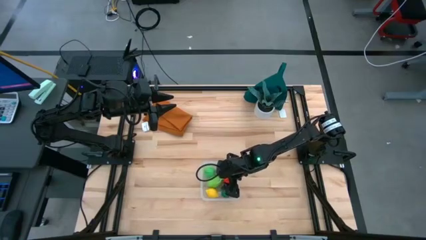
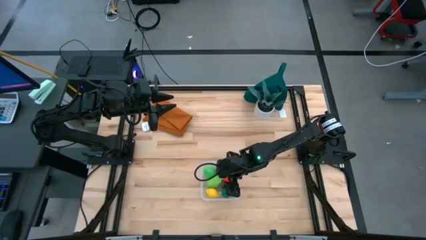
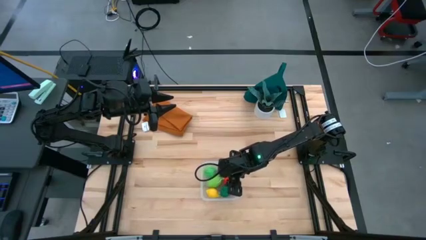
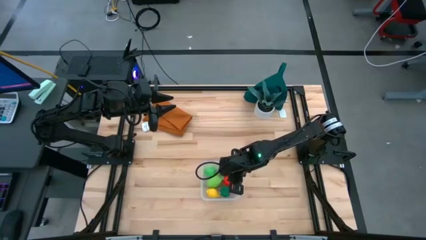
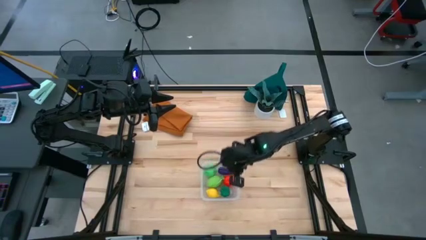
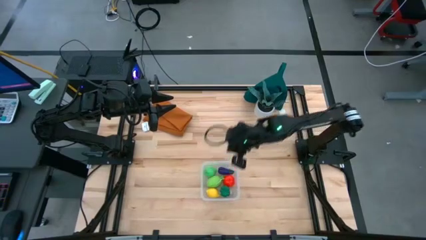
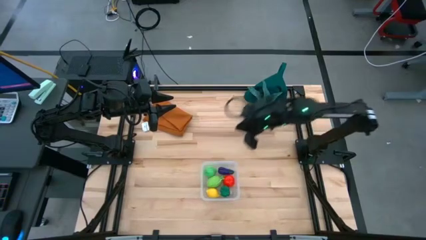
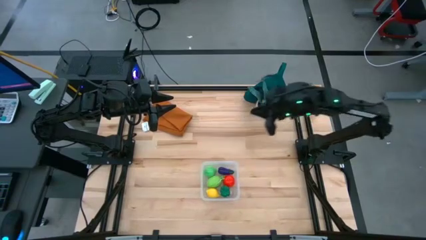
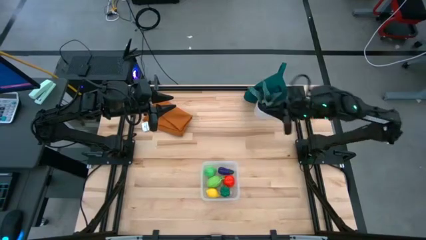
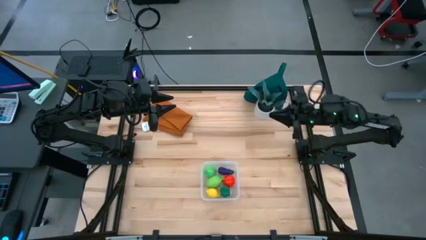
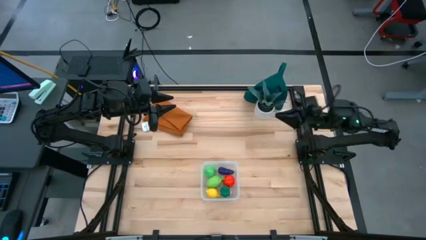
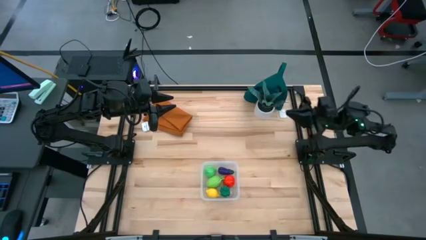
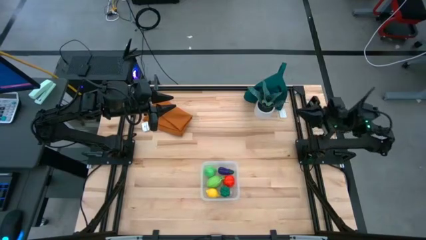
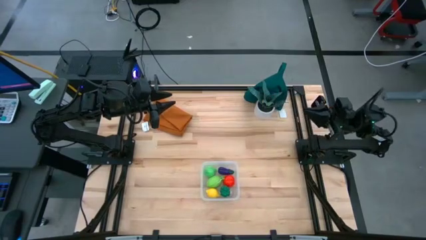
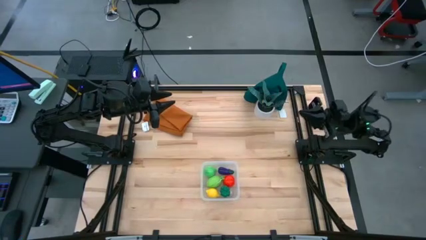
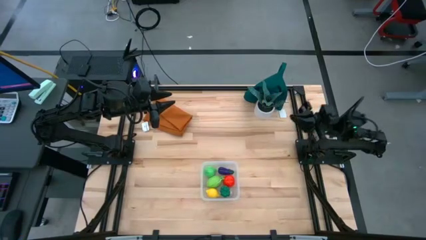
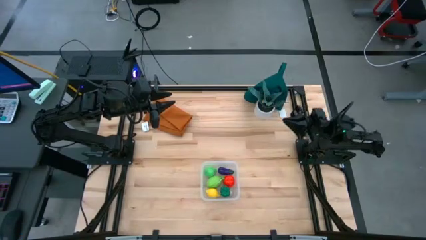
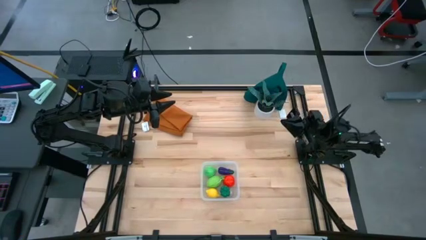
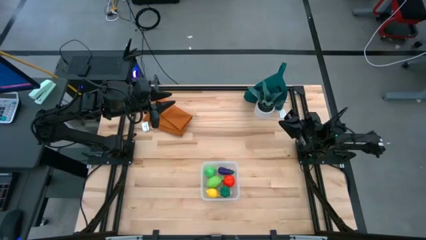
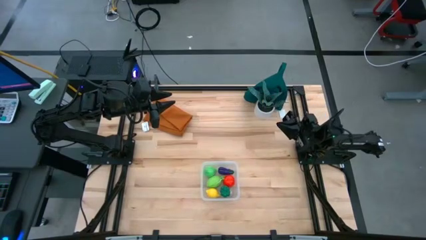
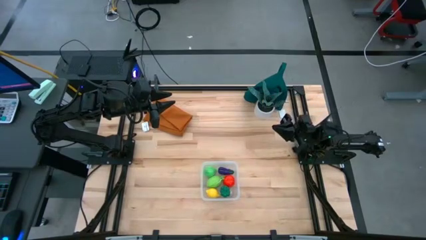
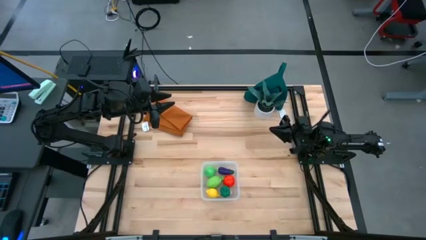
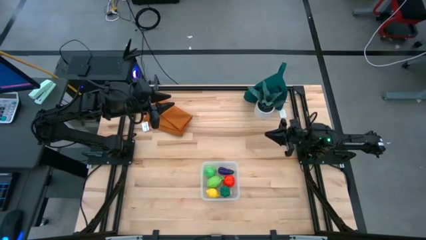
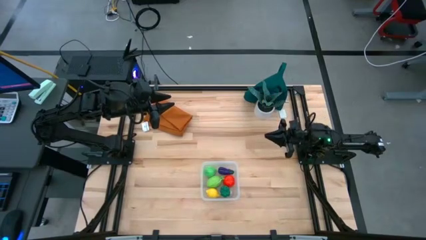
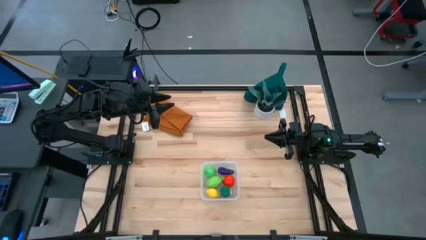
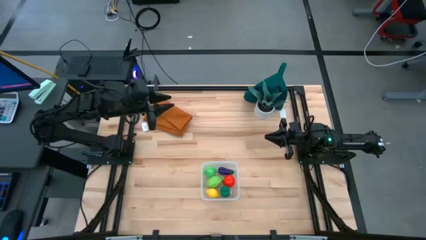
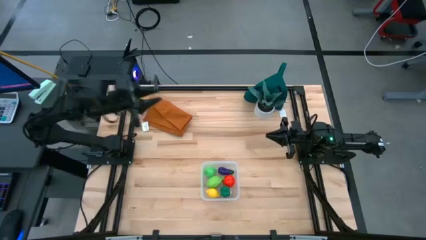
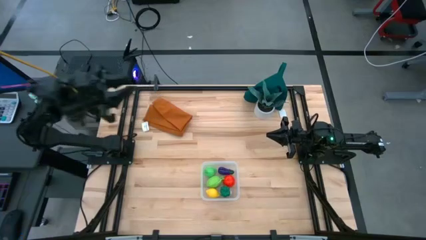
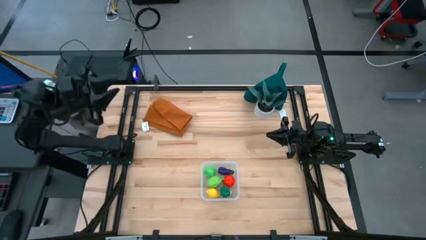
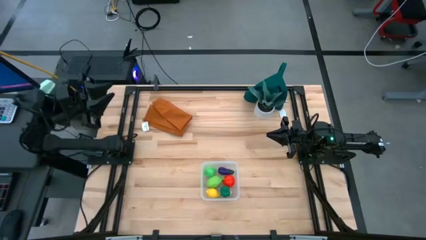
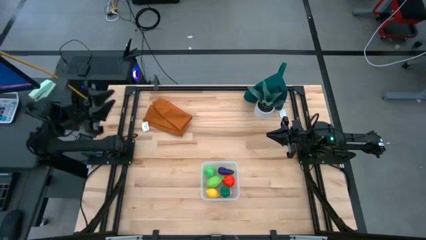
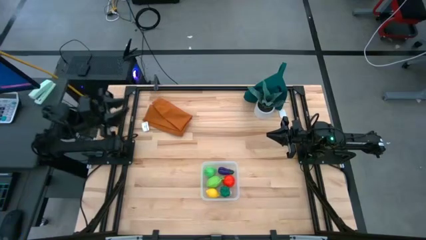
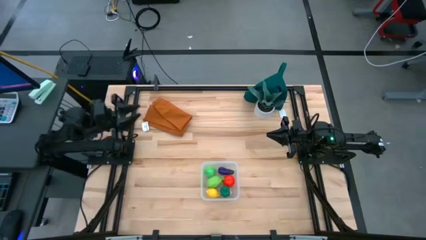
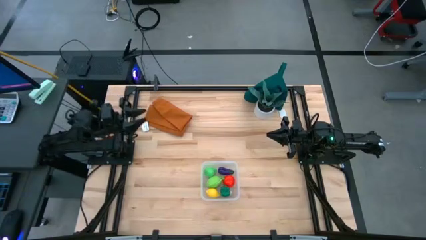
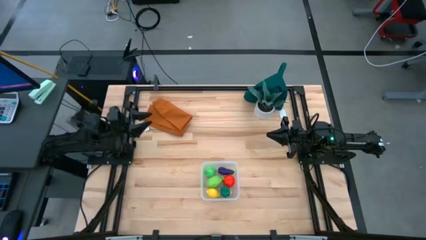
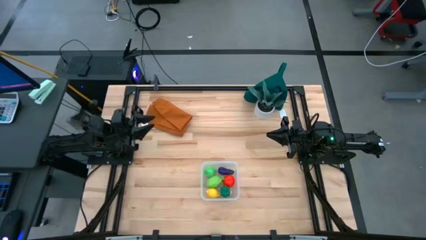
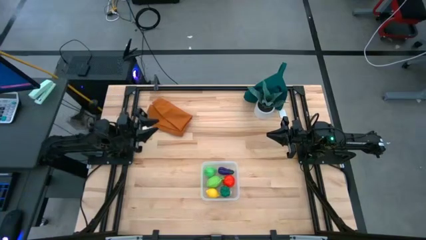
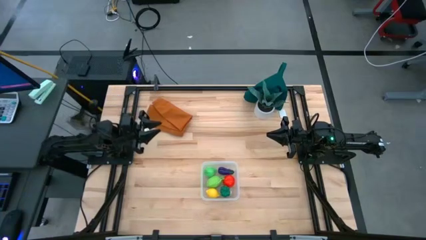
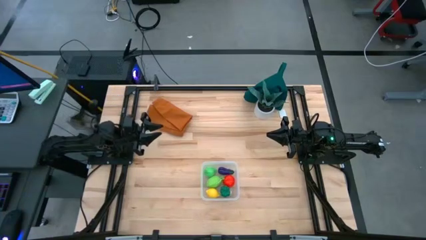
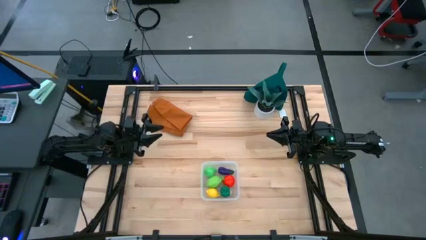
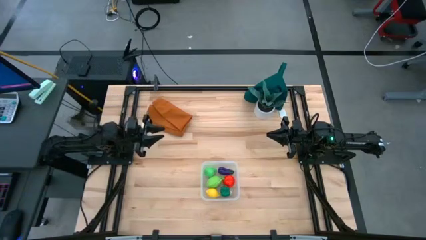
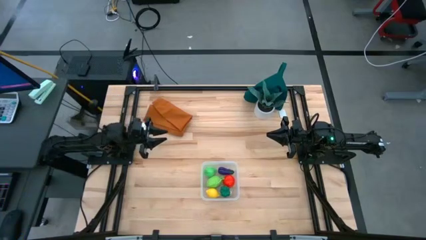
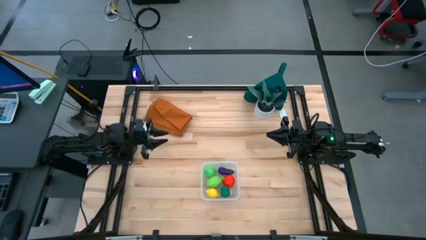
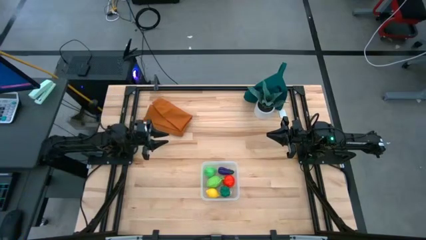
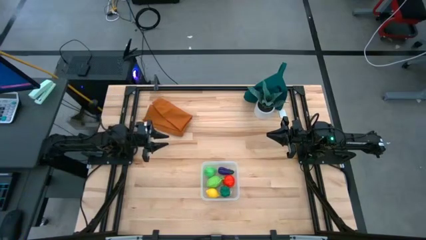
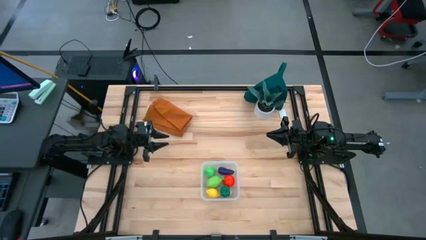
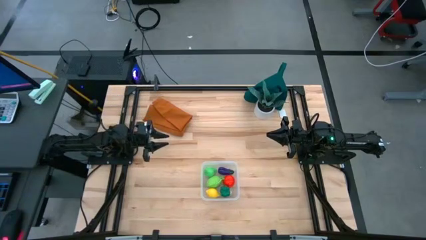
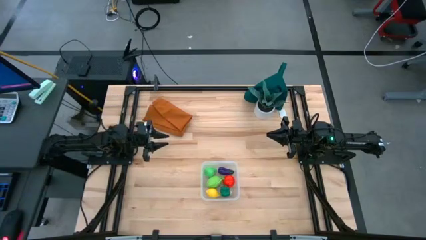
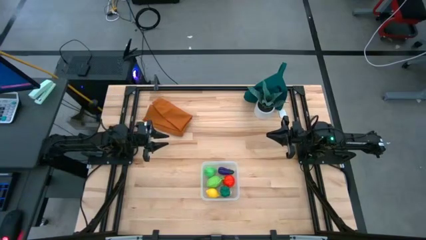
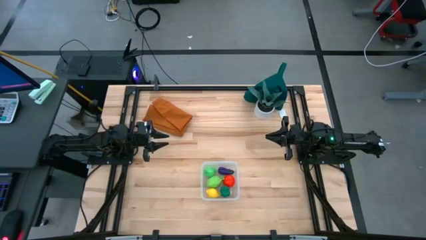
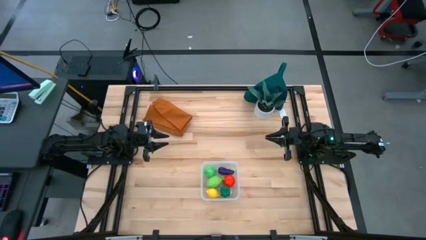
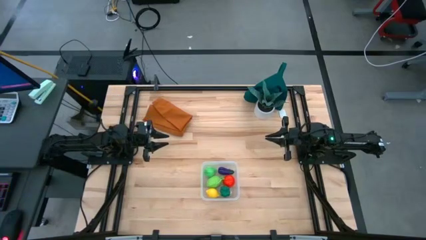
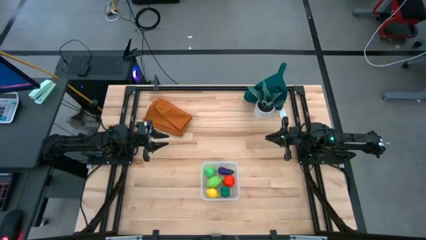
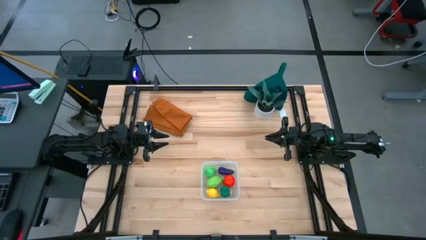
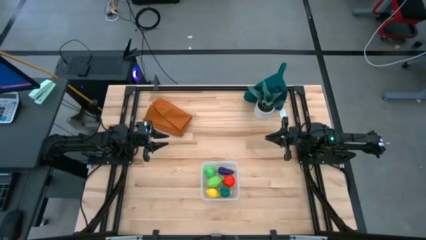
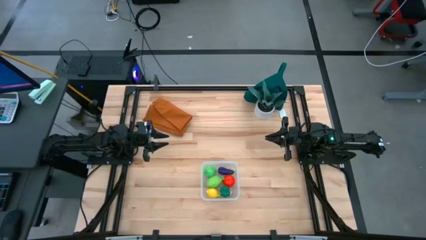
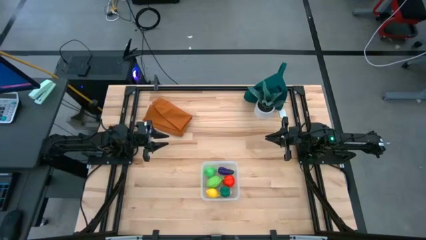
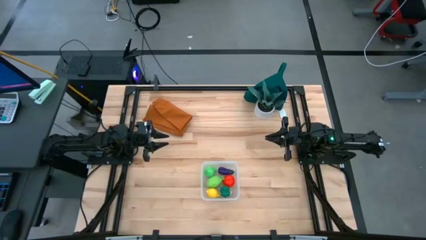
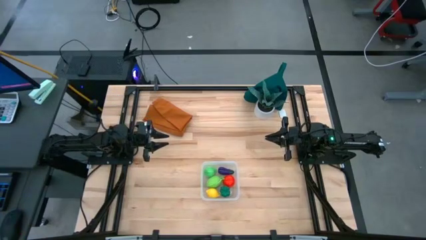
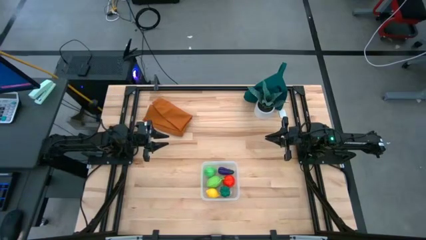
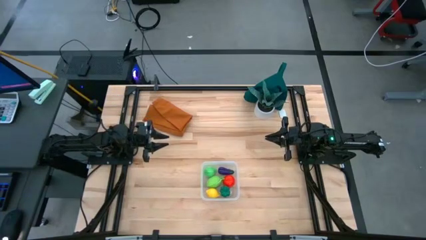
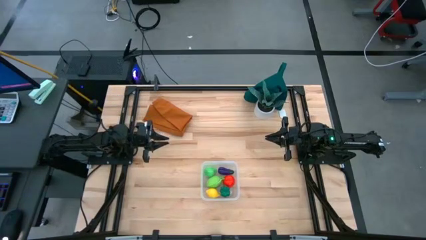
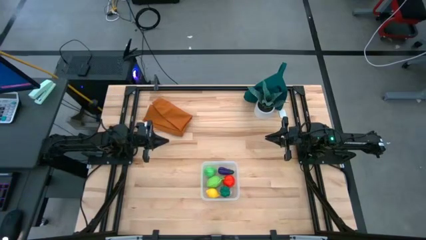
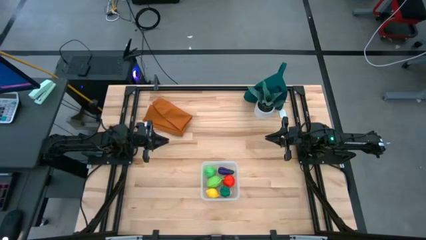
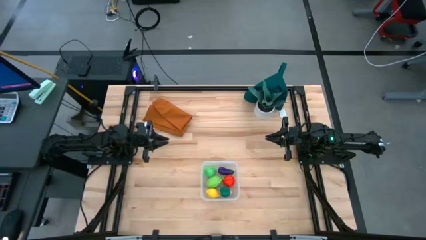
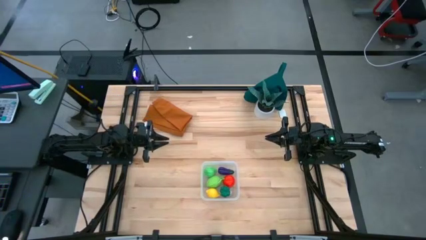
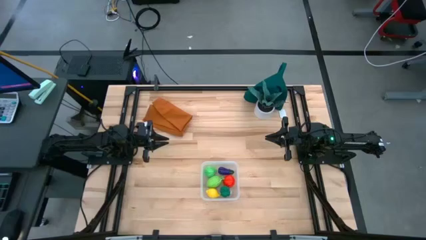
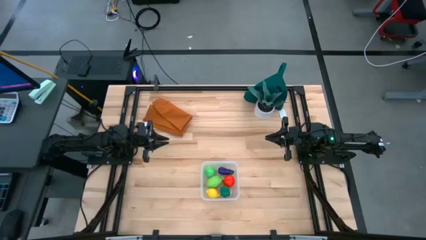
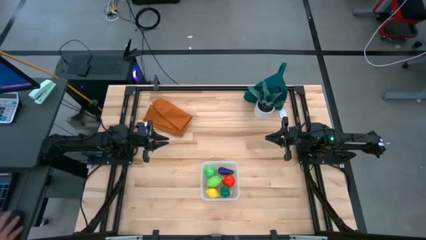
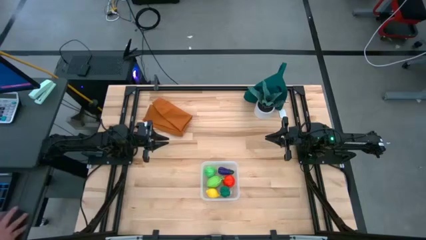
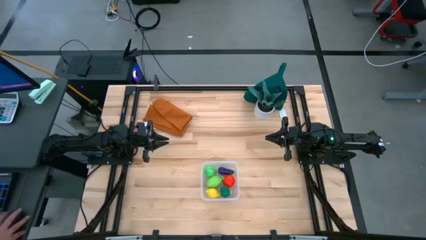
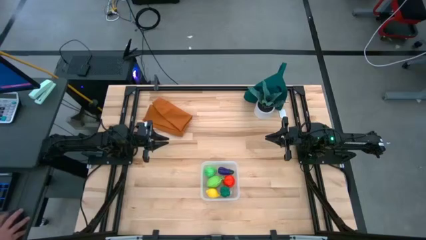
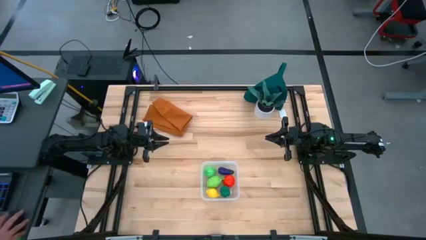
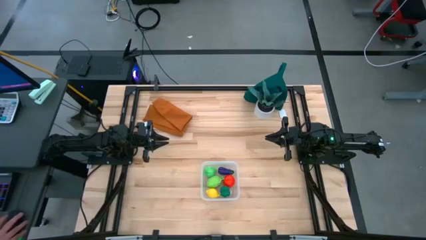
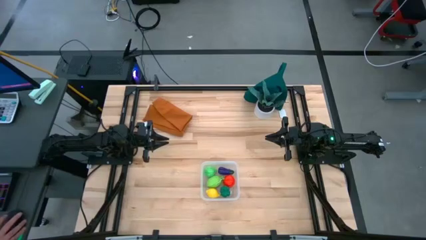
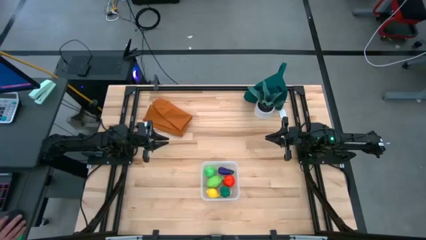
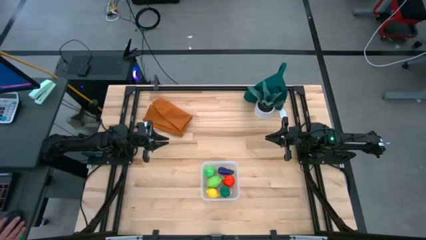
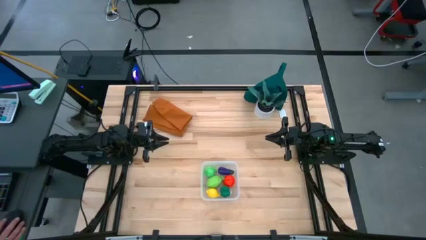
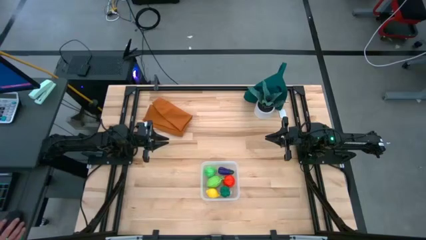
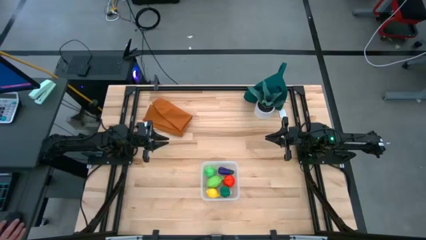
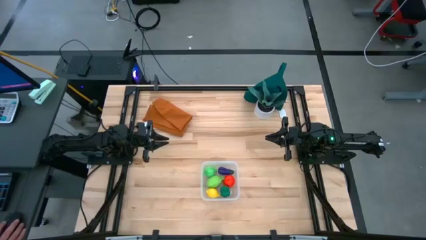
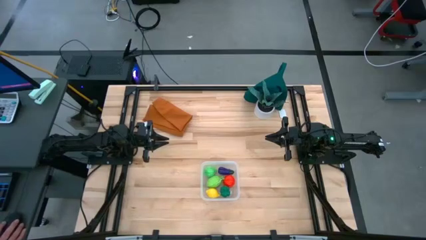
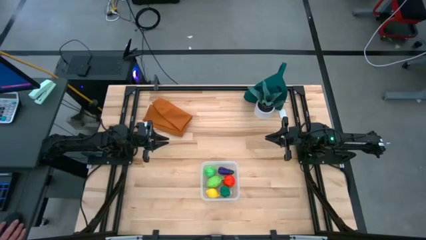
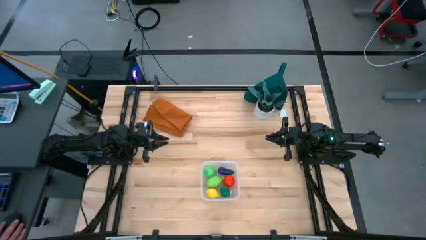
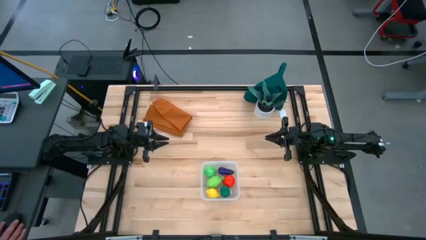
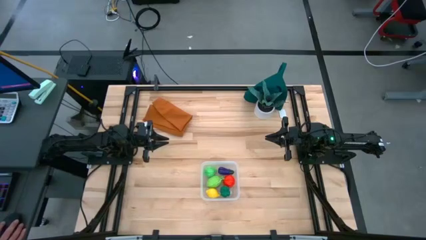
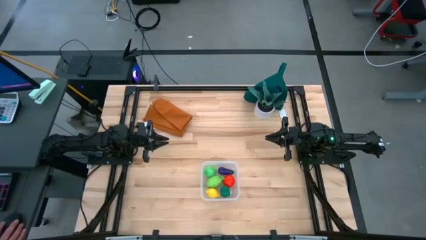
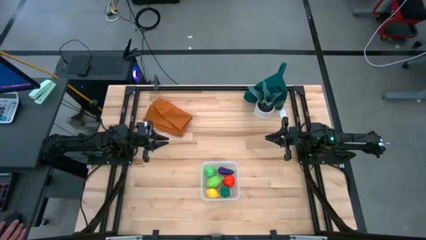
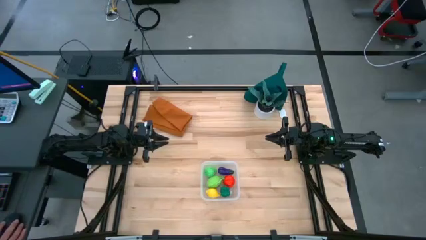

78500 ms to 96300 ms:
Task: Pick and placing Produce into tupperware
Return to Home Position
